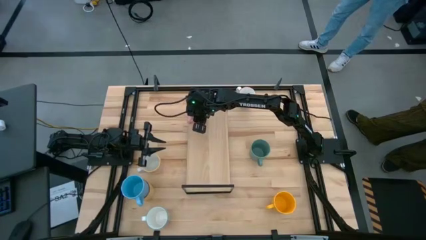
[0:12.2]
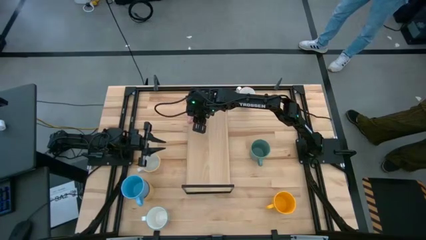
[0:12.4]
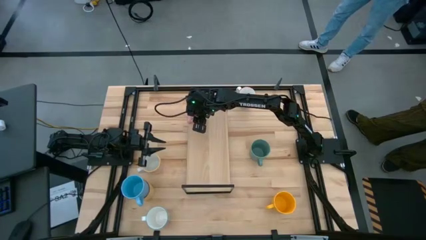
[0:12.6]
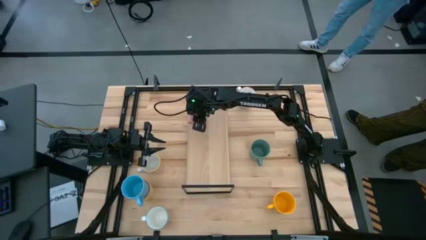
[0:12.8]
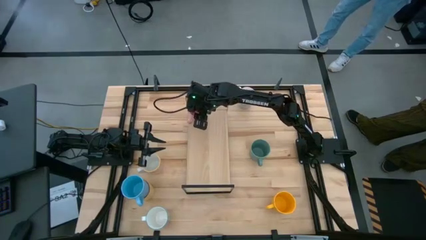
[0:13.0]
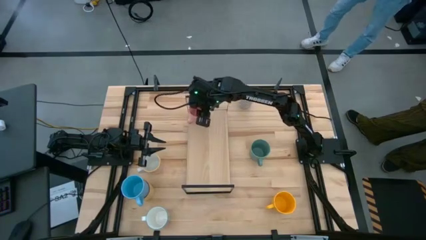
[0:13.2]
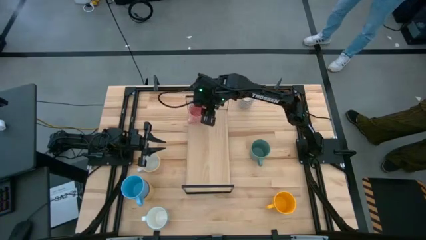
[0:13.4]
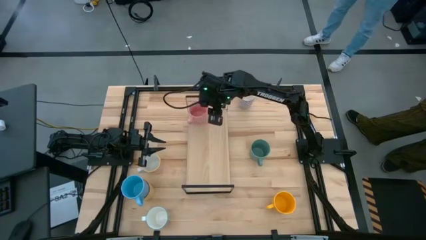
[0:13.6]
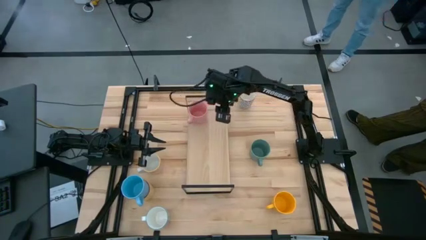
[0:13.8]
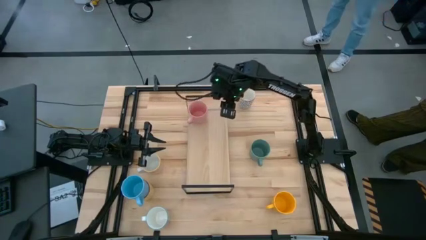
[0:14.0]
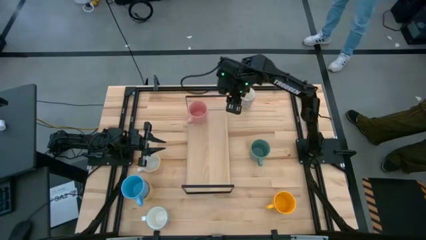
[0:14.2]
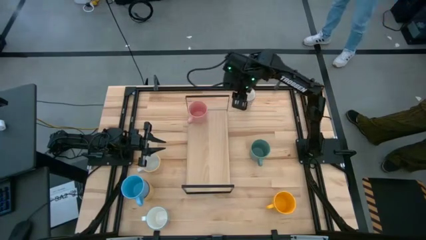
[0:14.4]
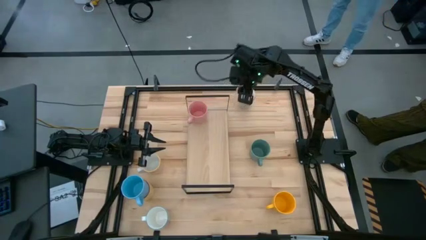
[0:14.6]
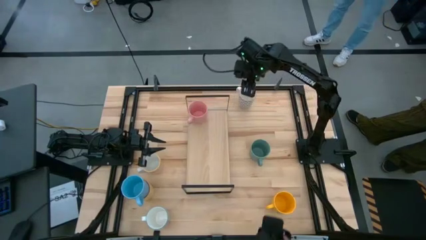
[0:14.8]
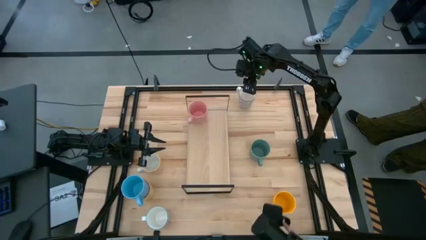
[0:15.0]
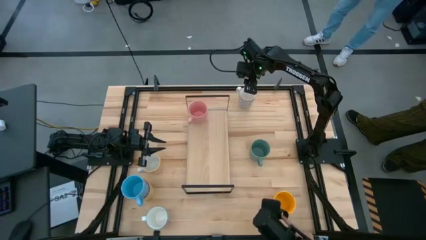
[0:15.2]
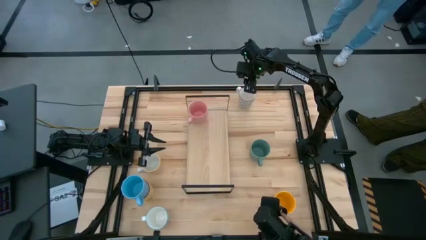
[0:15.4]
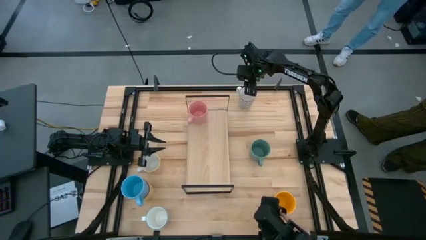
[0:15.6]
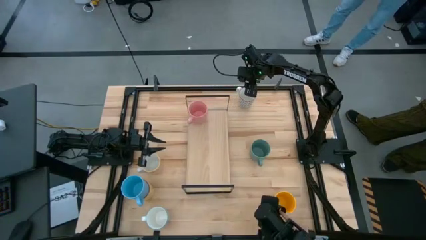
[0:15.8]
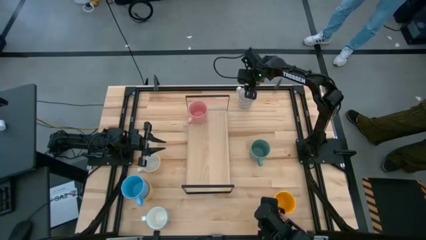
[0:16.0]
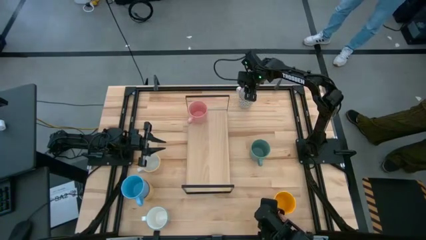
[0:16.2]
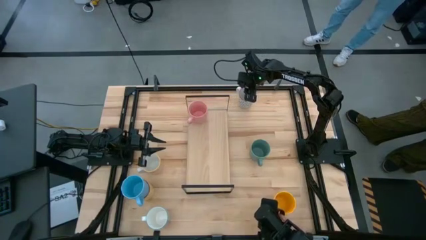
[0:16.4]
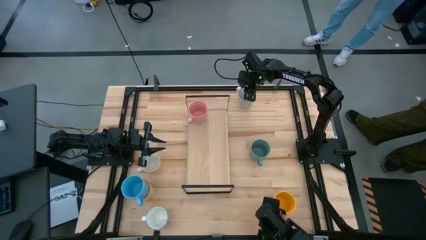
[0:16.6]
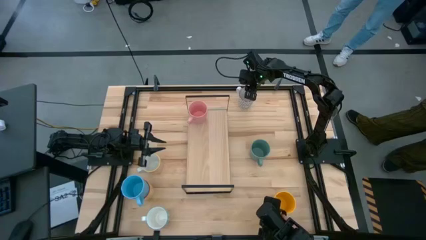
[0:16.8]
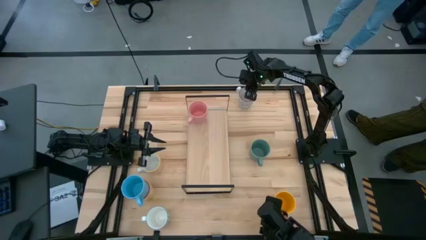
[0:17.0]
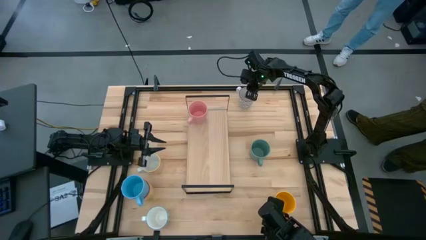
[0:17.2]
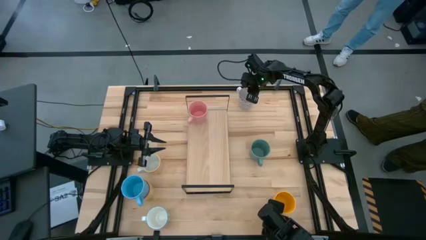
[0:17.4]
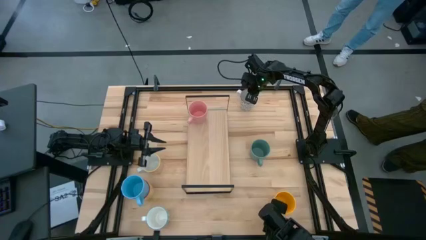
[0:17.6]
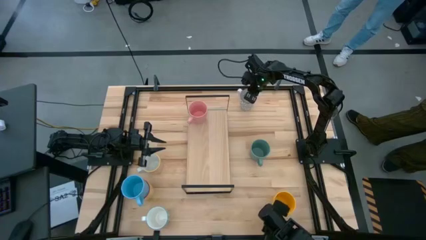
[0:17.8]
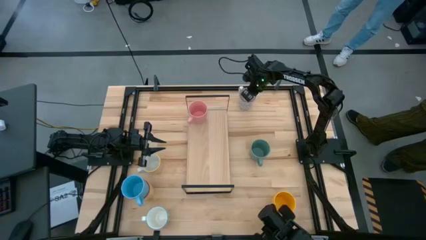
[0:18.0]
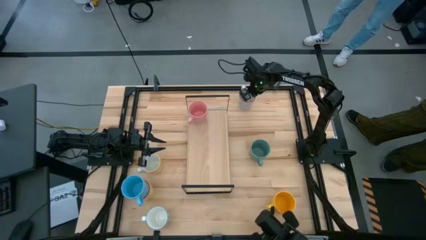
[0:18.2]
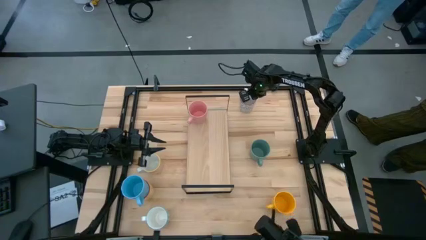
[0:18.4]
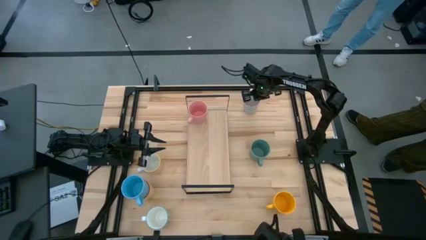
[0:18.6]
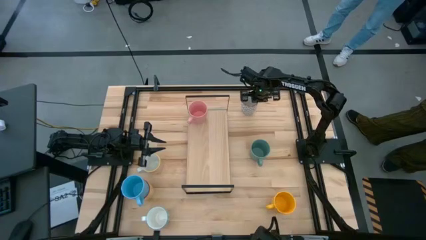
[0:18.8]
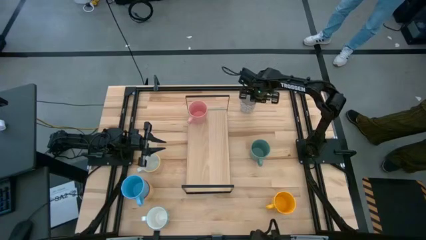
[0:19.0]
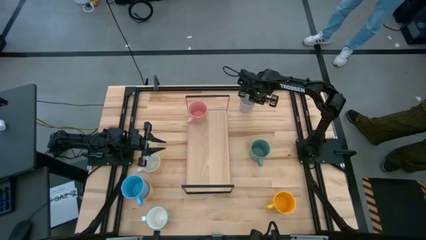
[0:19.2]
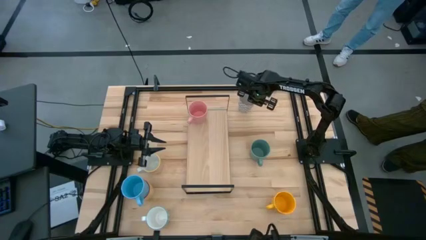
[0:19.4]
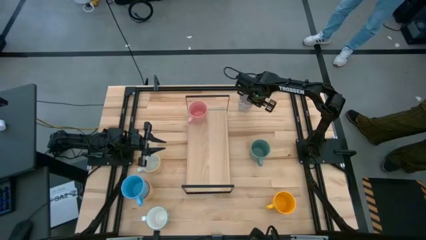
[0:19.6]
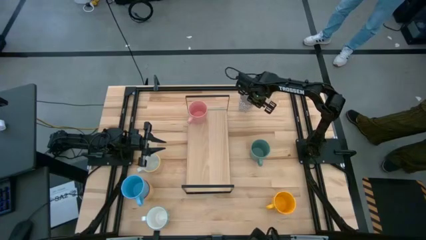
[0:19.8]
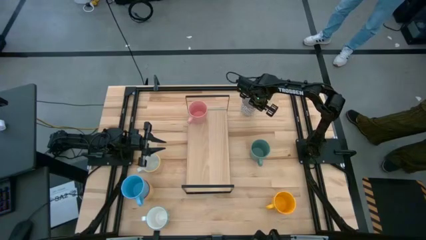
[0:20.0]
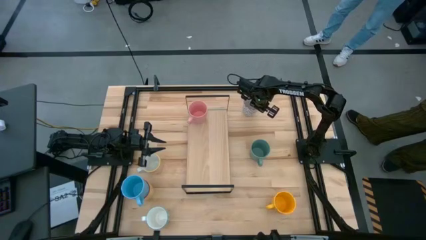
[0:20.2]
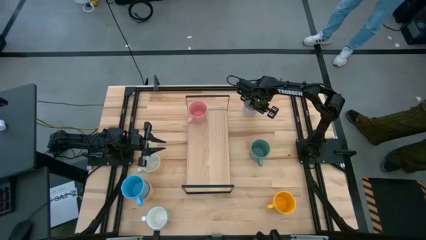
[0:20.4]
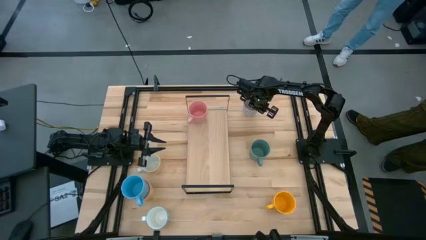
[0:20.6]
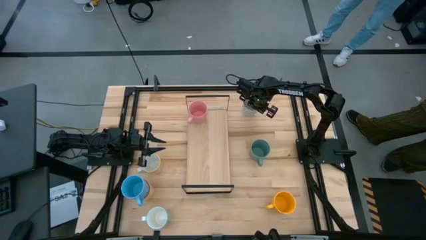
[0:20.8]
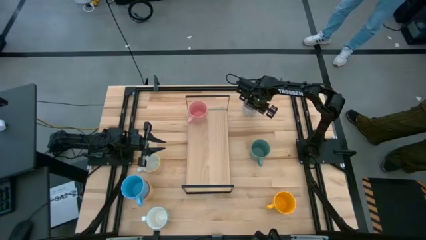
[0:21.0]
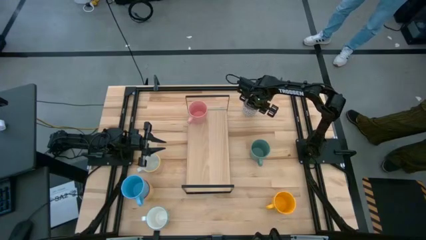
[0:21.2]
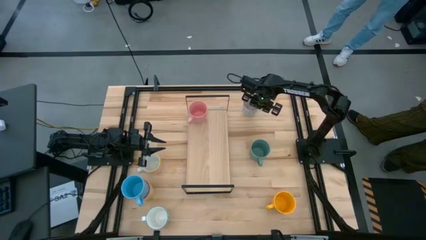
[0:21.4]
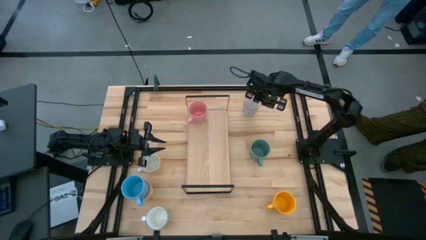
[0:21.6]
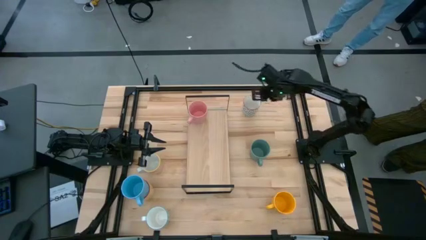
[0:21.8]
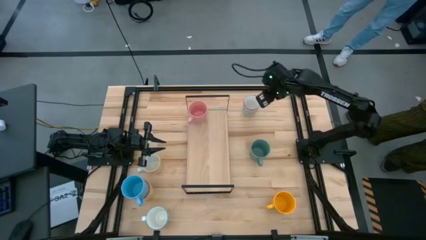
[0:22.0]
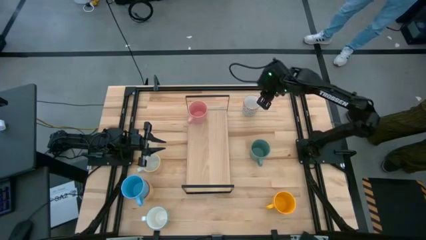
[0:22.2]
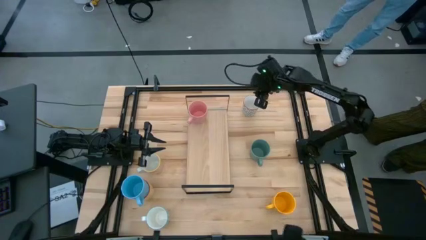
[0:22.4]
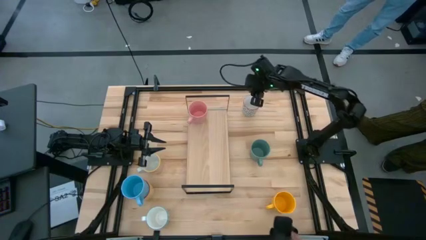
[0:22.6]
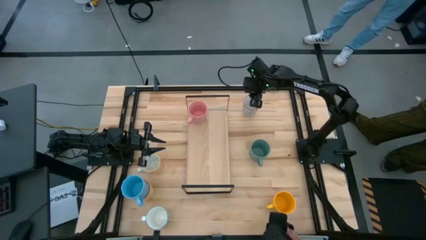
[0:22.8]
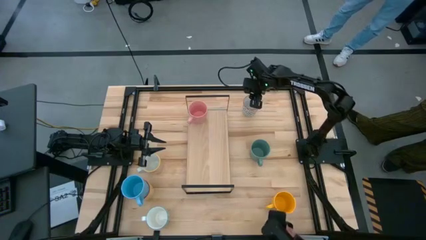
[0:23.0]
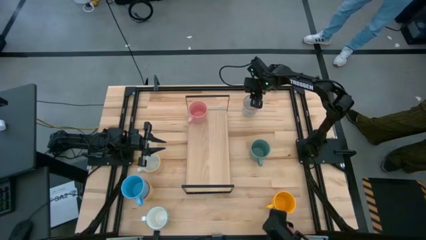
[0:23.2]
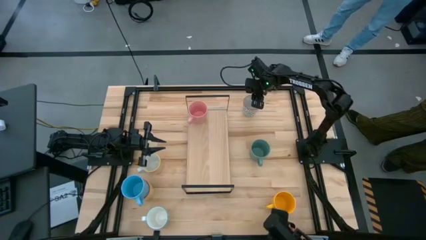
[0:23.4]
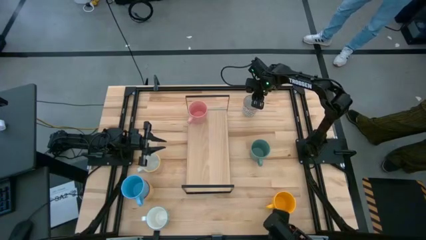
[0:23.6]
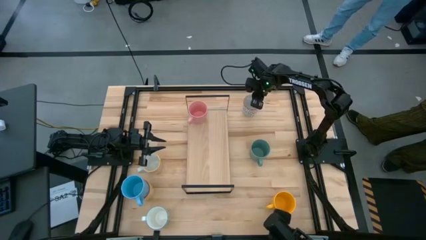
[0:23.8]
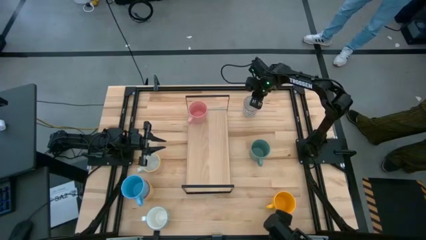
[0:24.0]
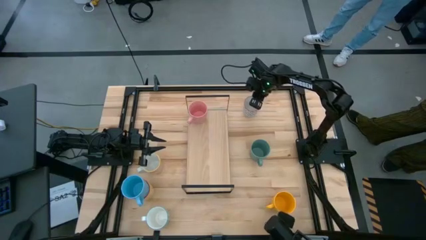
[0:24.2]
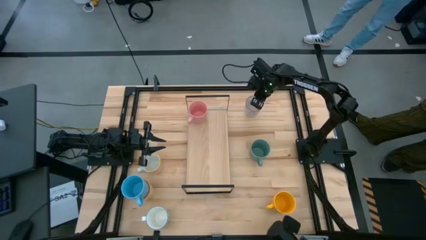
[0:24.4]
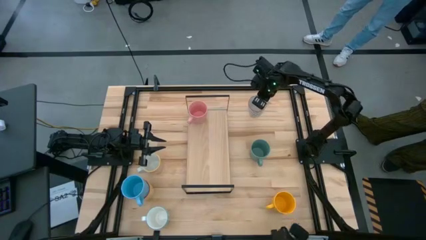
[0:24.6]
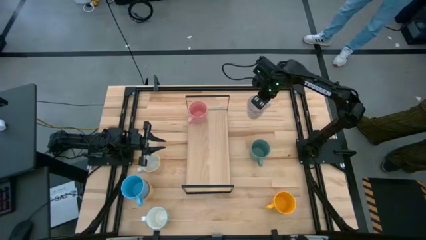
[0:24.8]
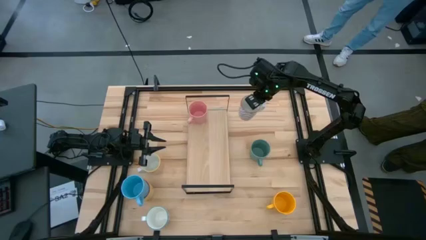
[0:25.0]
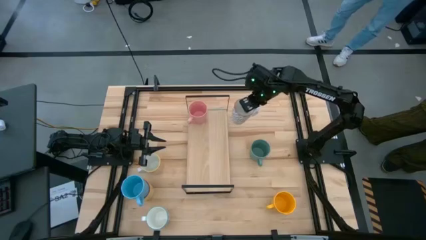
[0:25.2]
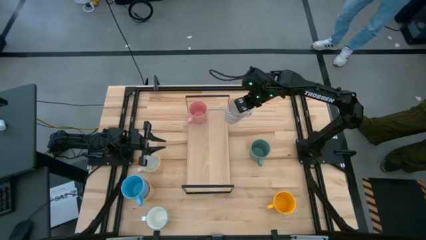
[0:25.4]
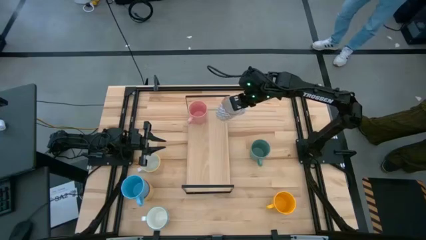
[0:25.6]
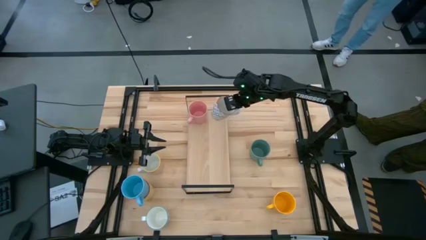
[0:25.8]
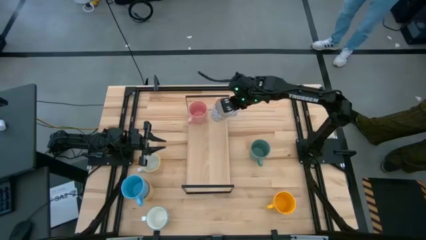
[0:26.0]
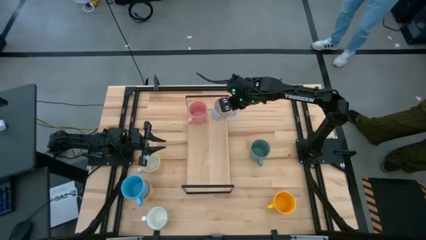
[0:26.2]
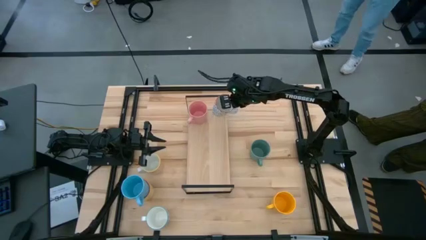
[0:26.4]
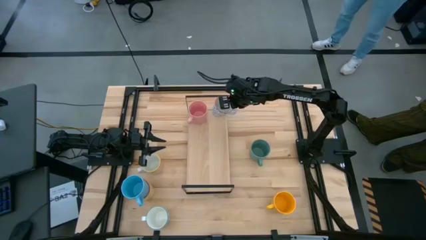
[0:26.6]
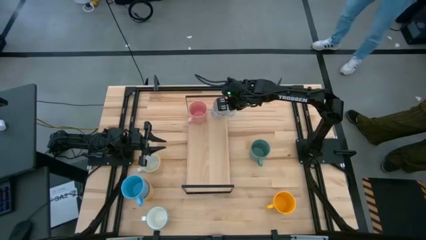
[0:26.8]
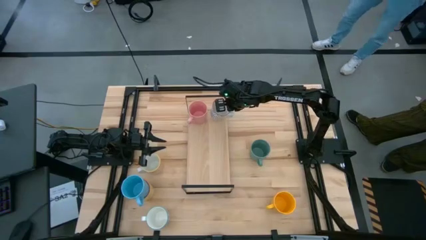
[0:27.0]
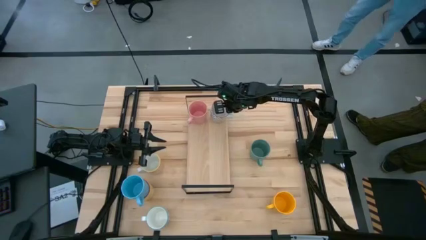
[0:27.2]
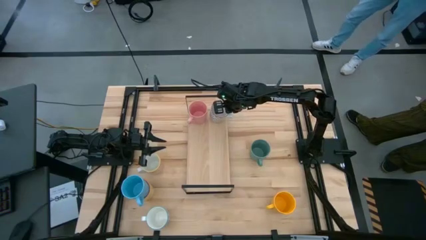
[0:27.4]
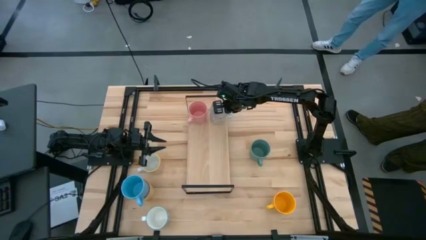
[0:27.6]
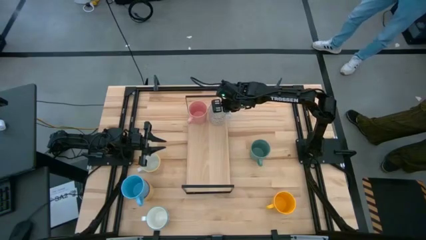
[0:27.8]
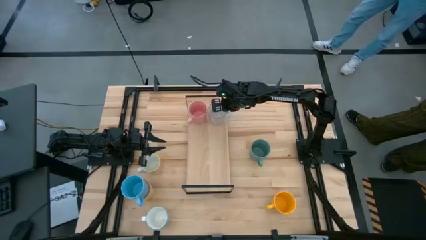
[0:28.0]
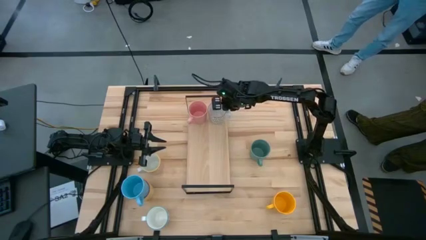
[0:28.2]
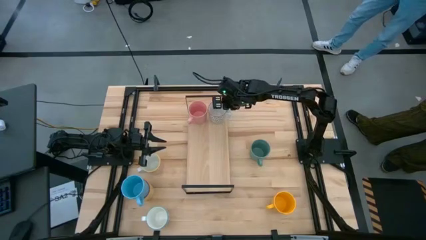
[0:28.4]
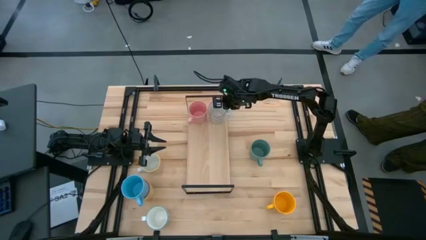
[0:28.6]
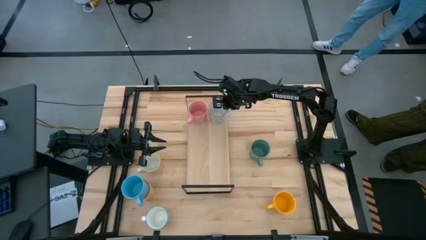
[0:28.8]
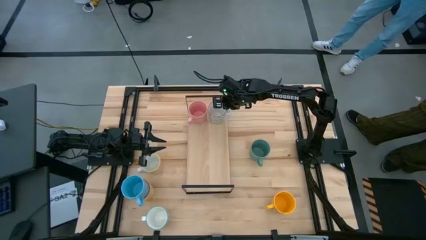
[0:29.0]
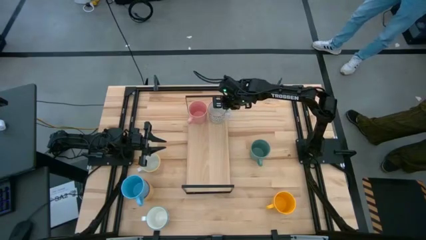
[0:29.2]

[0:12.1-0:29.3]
Task: Place coffee mugs
Put the gray patterned mug on the shelf
